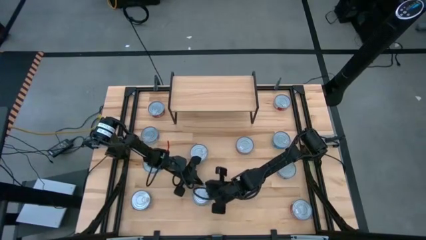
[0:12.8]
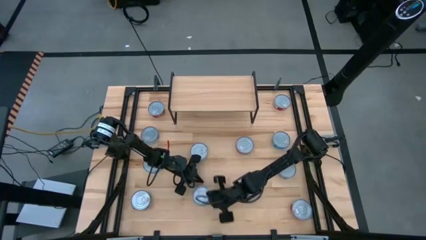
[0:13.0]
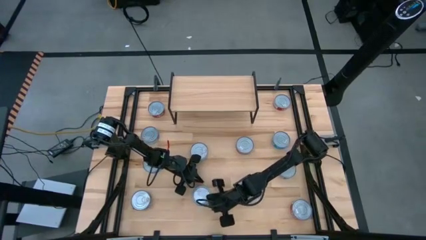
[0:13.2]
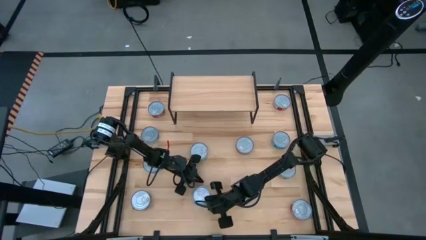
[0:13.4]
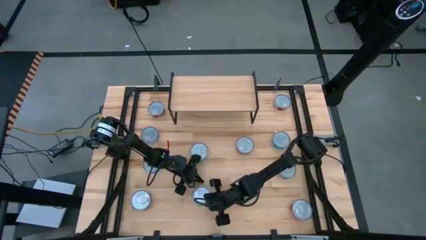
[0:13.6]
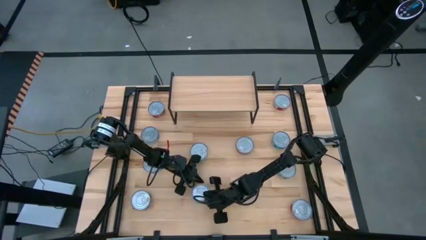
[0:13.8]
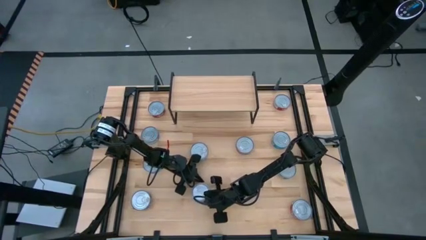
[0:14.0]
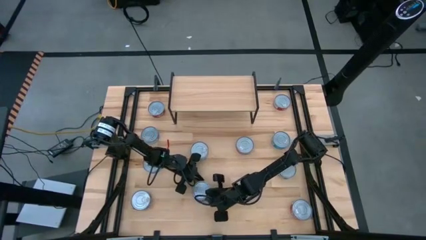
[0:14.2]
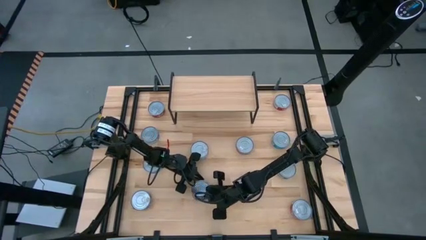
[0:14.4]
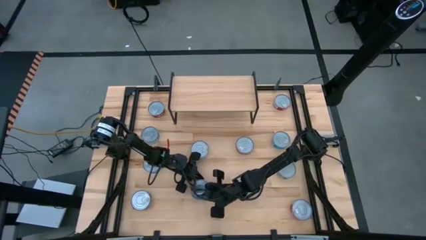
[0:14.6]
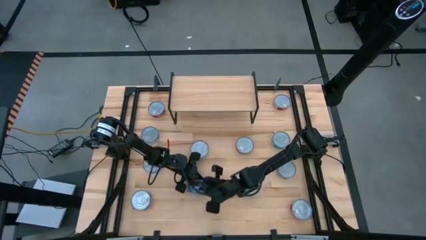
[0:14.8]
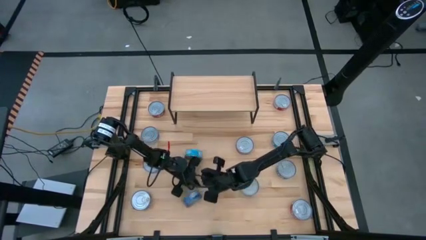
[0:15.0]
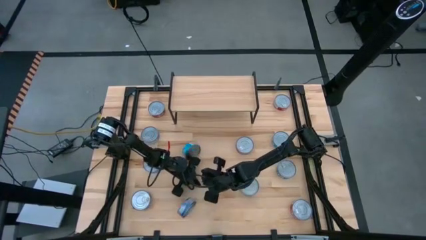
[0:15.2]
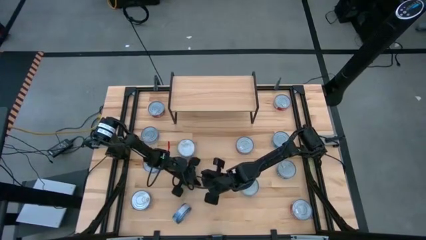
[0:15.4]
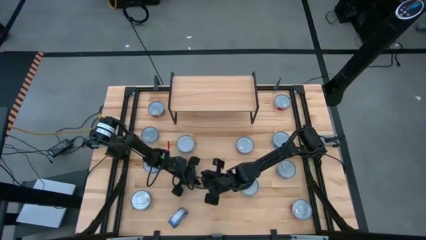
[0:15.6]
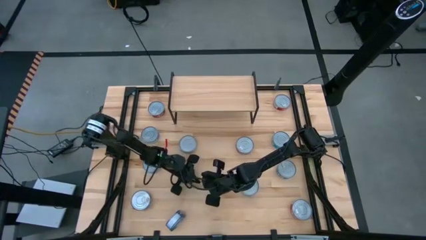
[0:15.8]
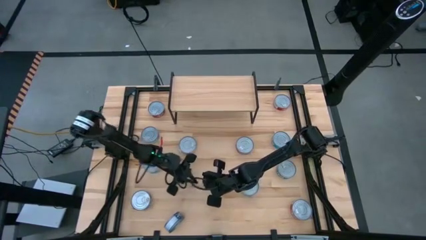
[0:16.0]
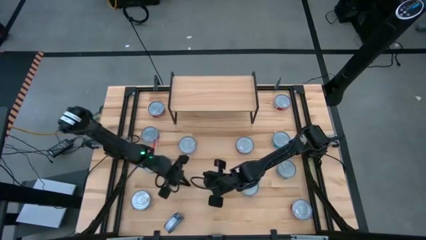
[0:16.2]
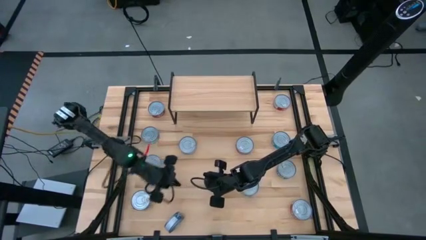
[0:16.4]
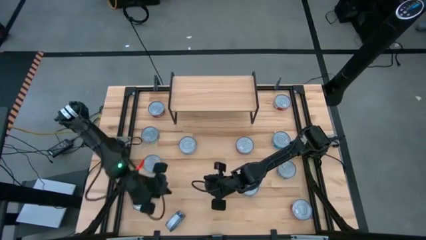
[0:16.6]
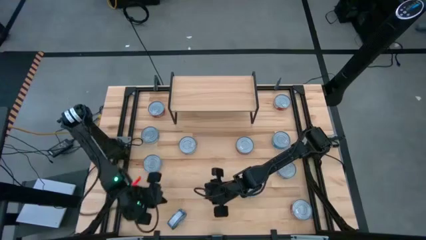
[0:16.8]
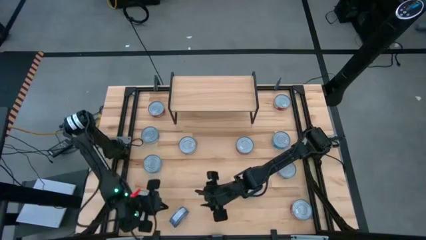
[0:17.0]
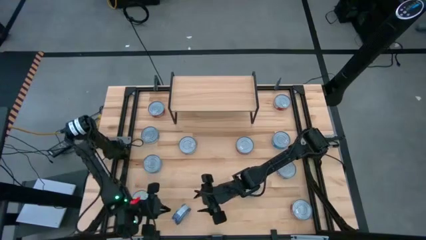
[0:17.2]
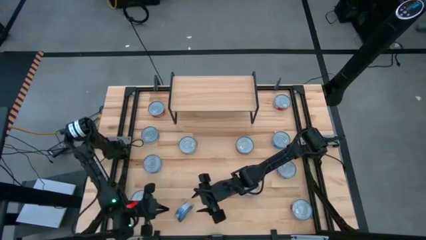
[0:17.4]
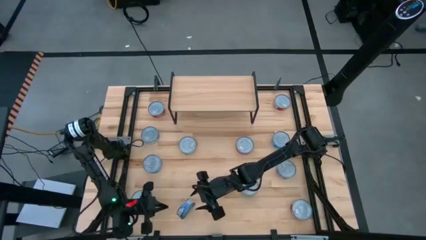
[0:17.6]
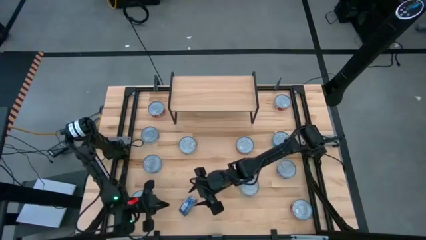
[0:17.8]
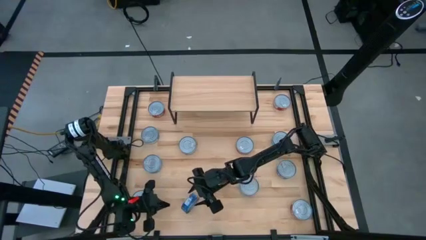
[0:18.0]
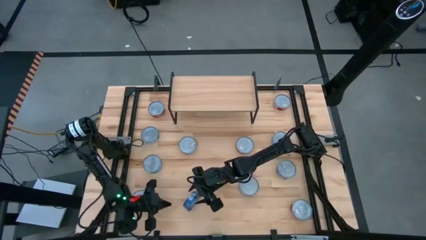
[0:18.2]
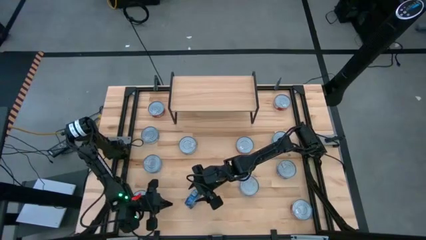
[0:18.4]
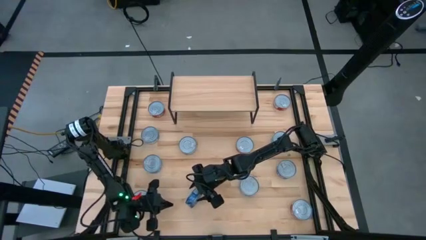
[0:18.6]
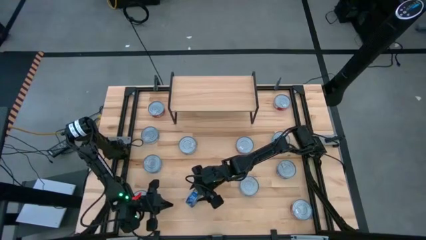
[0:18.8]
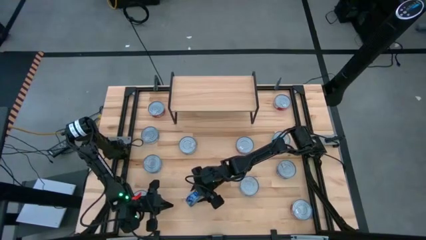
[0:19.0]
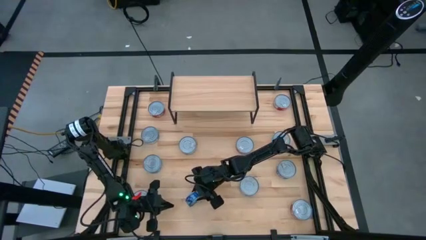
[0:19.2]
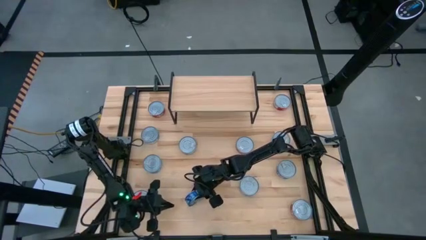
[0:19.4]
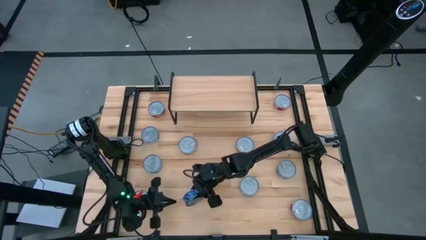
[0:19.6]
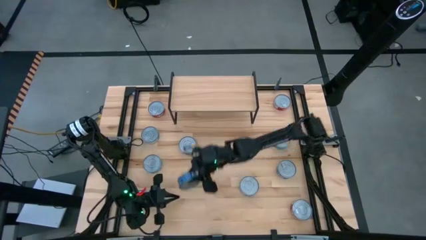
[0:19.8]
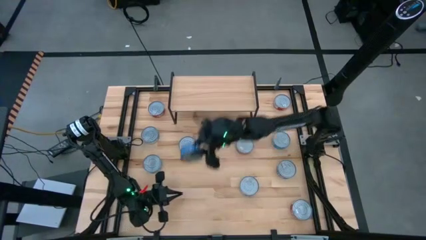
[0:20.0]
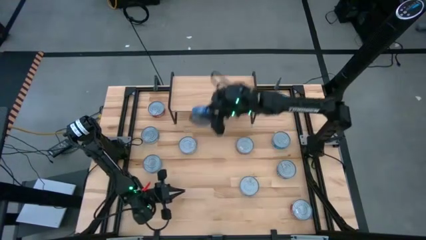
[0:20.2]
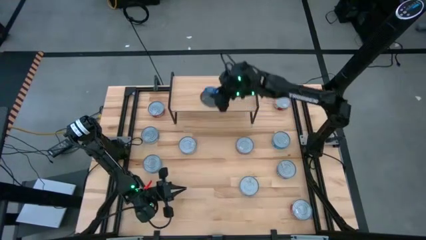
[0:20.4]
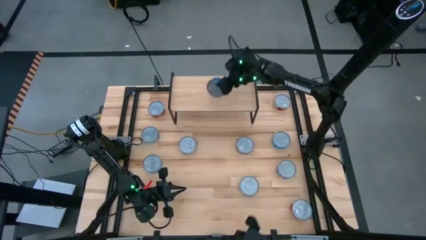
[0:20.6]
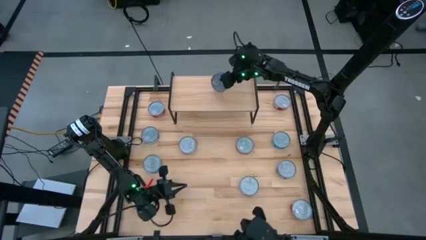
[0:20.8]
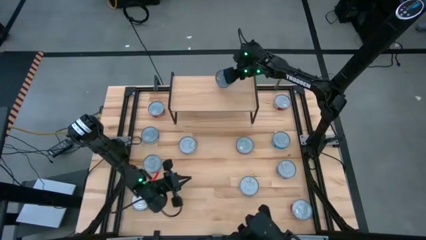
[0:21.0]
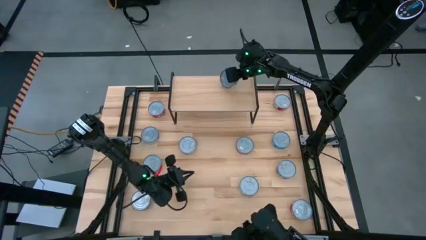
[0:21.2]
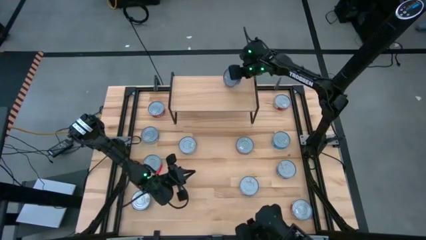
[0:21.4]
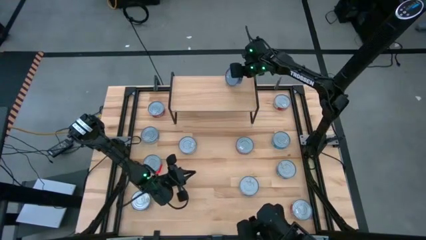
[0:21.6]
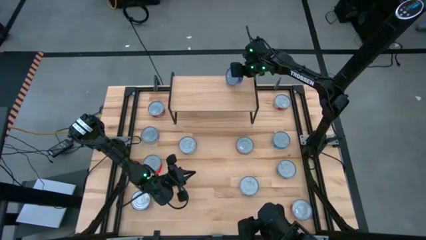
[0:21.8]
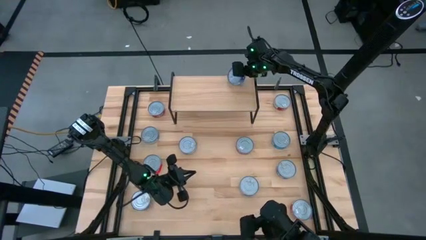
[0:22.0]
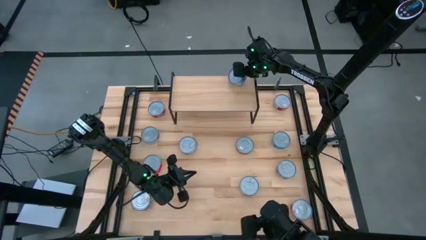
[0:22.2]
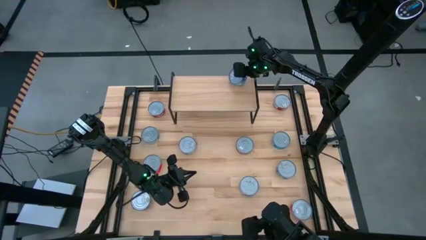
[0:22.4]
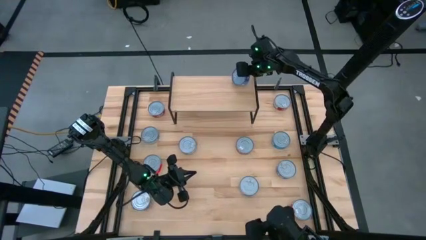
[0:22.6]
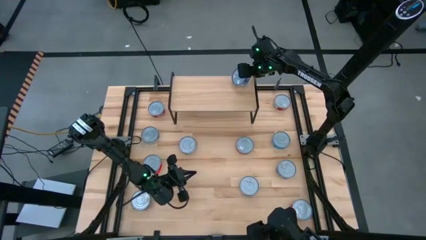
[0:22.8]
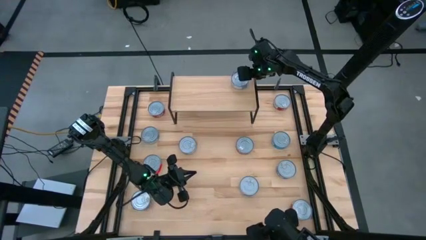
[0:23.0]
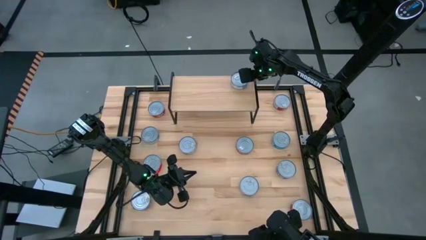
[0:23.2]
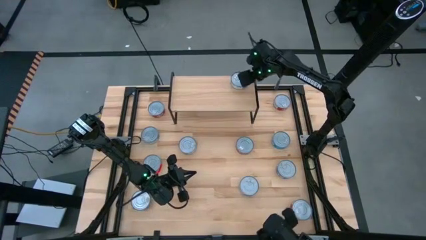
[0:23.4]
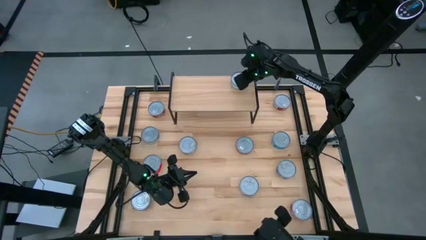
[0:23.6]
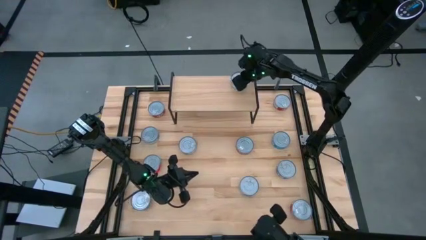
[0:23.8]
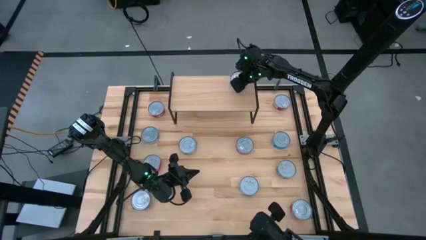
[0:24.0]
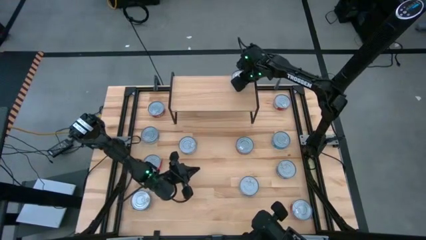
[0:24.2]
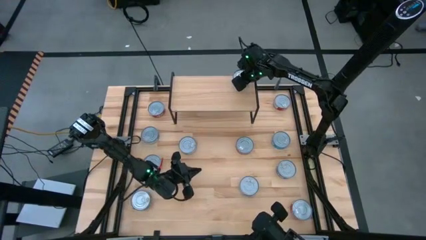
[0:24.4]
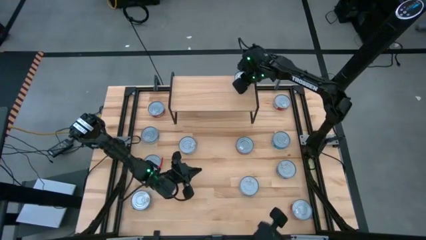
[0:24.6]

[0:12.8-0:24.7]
Task: Stack canned seafood by type on shelf
Put the blue tuna can on the shelf
